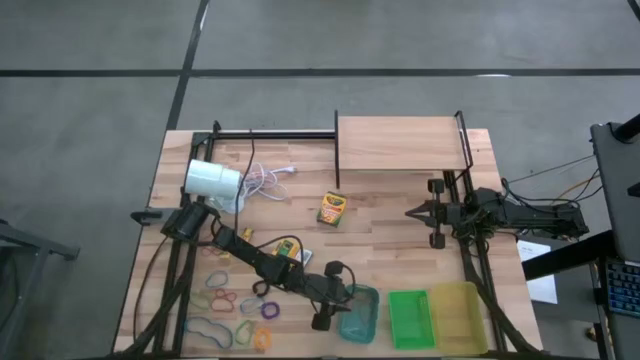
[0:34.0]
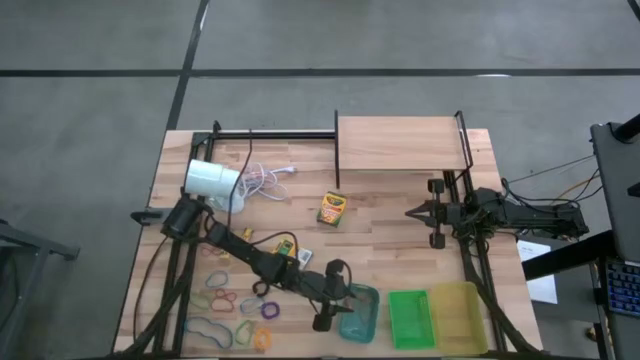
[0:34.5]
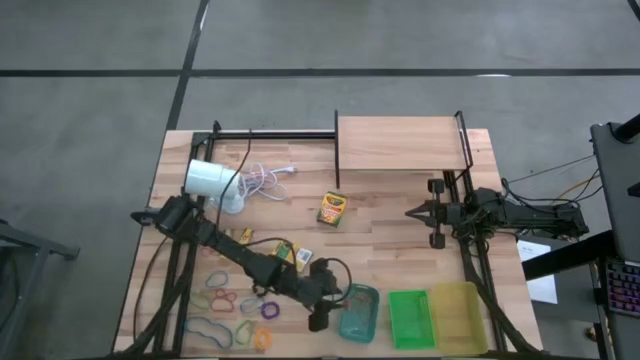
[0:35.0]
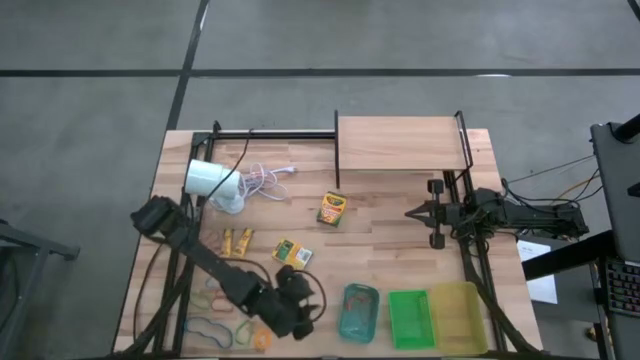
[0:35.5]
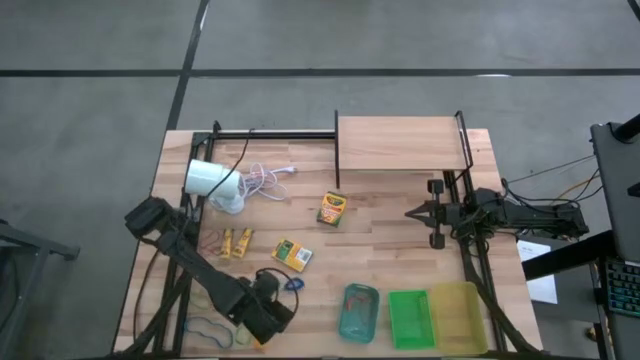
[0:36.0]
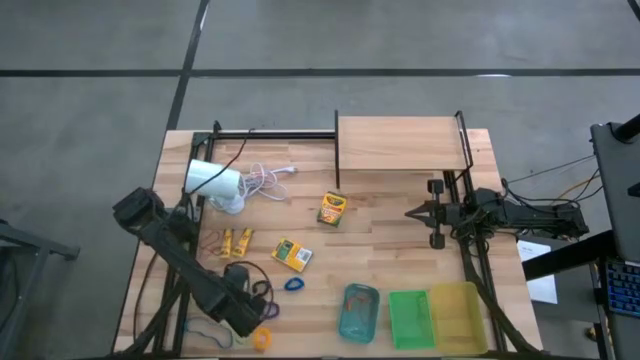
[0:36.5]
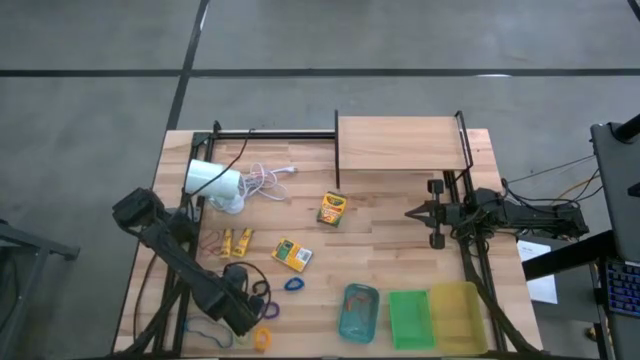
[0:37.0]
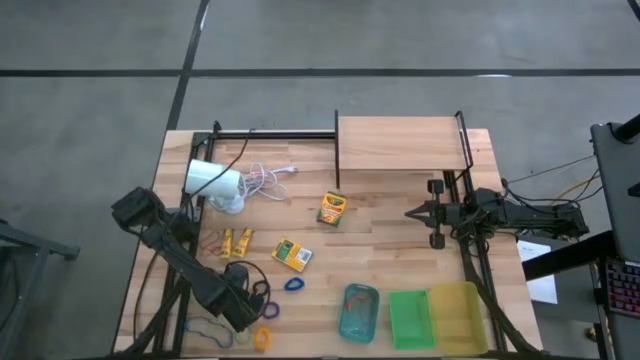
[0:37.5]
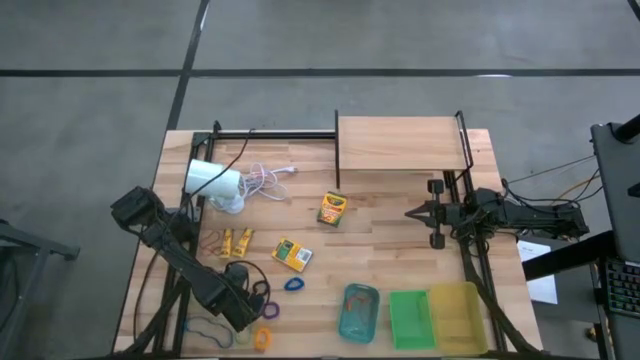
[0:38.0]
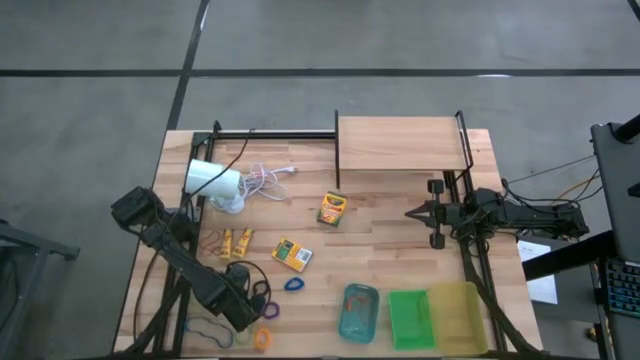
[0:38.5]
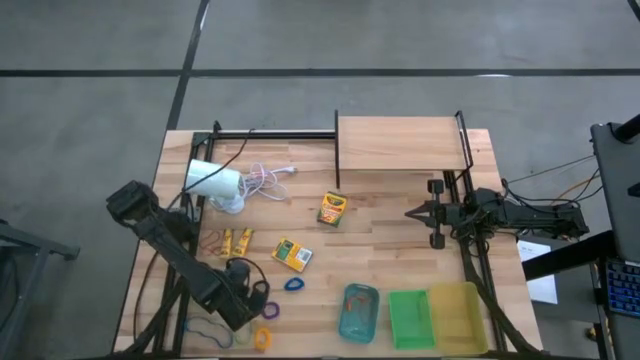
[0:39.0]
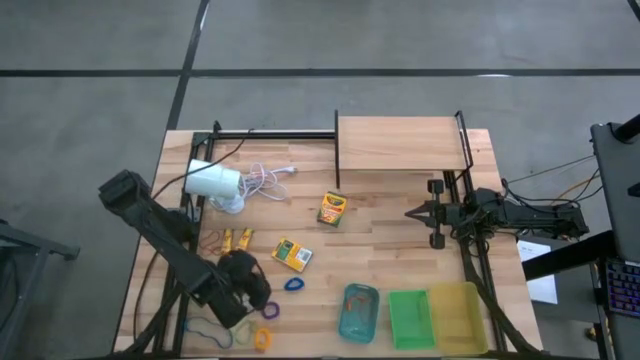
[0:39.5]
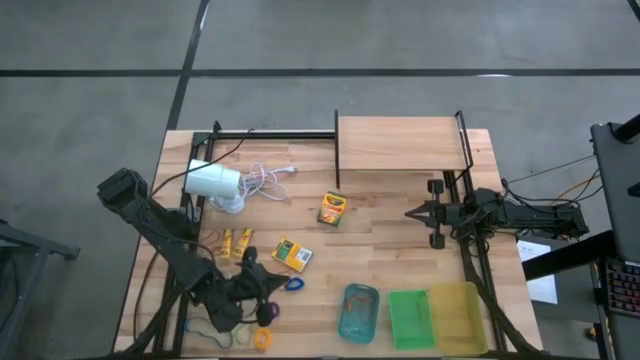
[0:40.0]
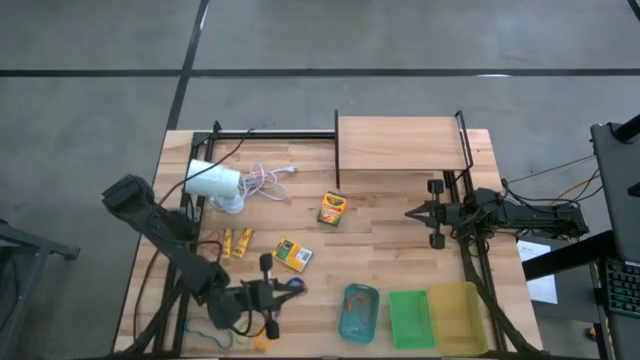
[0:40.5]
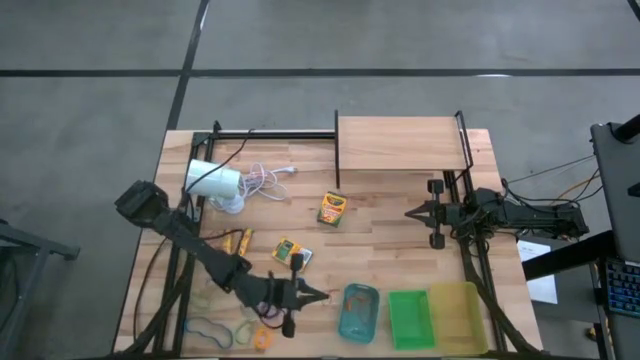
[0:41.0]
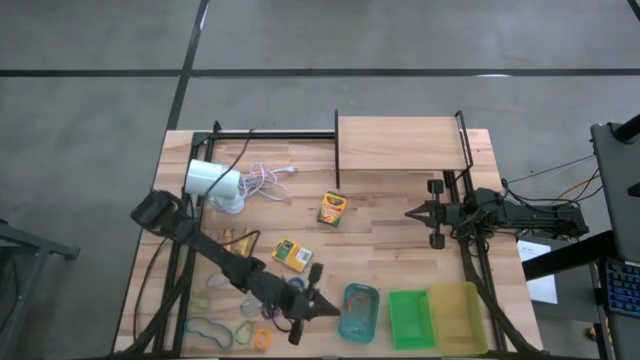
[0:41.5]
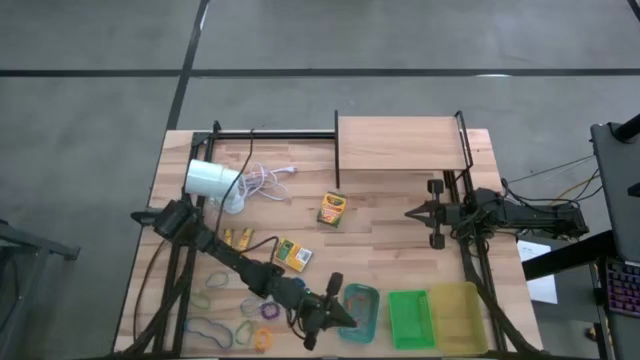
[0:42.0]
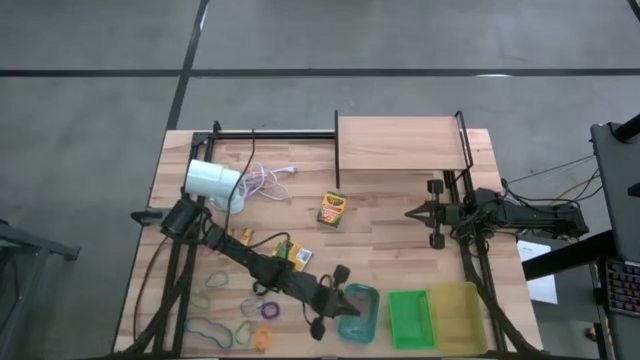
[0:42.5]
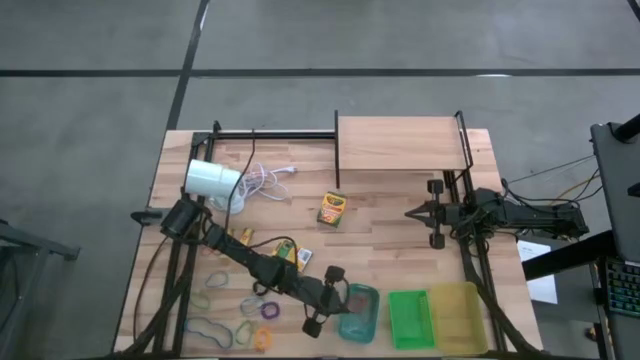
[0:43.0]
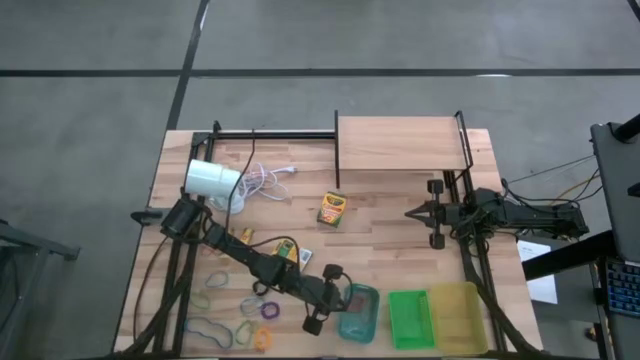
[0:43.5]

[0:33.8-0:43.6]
Task: Pick & Place Office Desk Supplies
Put the red rubber band into the blue bin

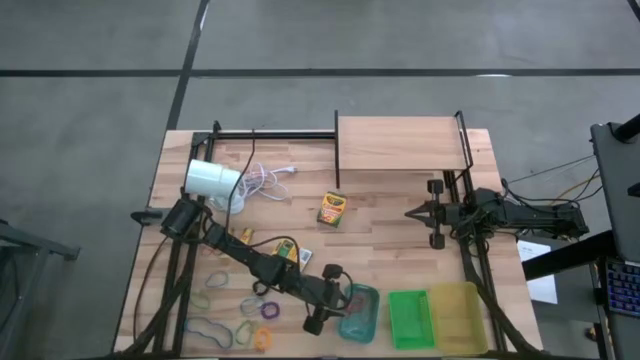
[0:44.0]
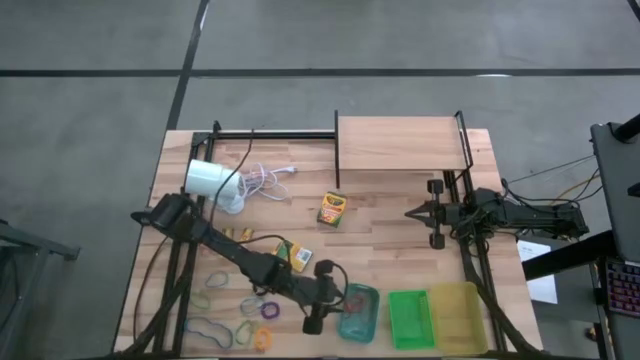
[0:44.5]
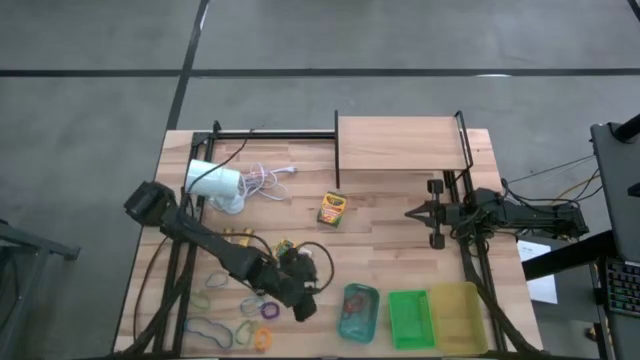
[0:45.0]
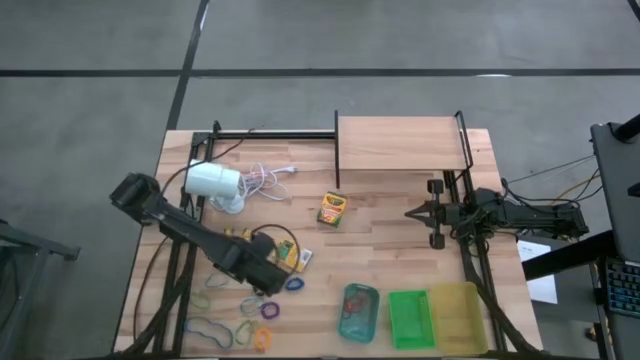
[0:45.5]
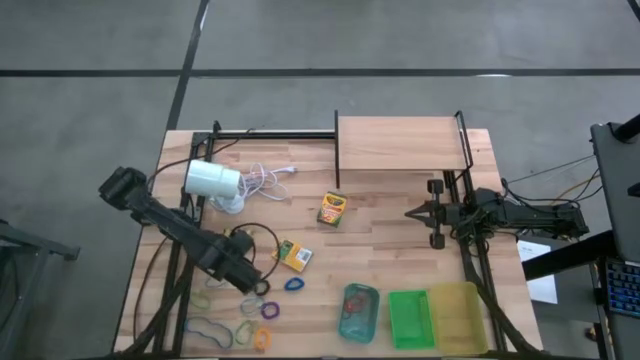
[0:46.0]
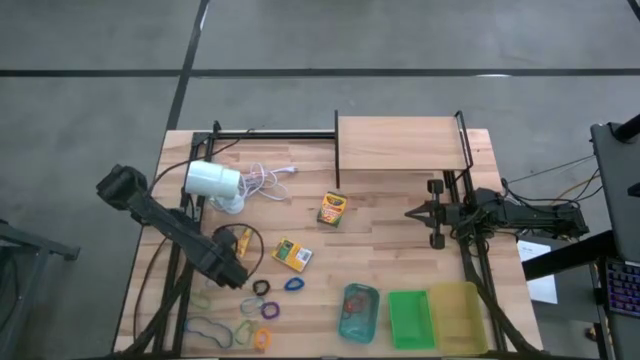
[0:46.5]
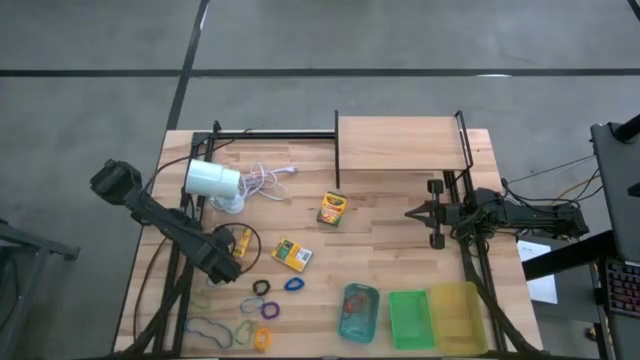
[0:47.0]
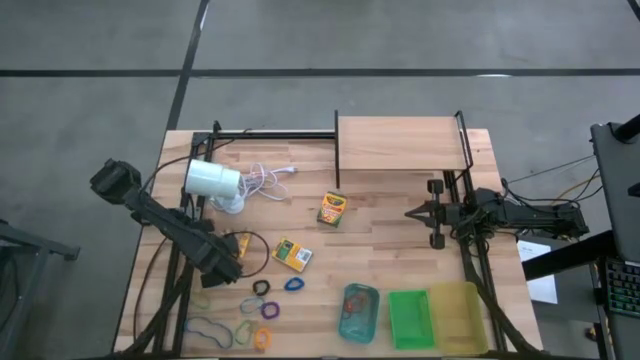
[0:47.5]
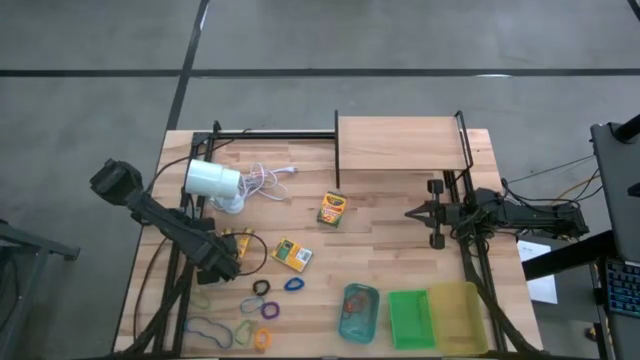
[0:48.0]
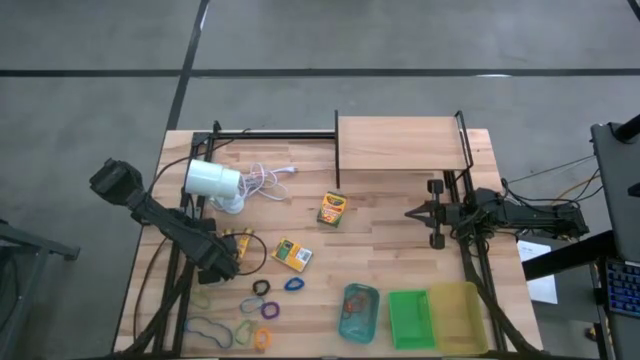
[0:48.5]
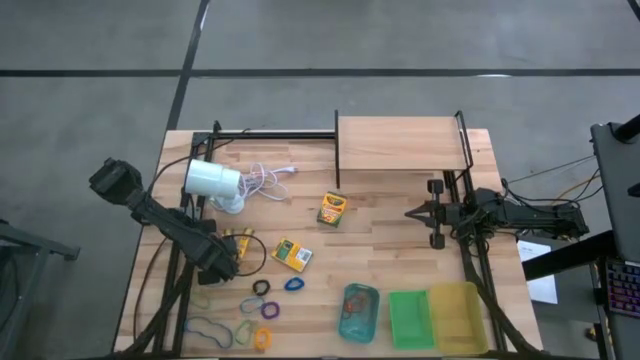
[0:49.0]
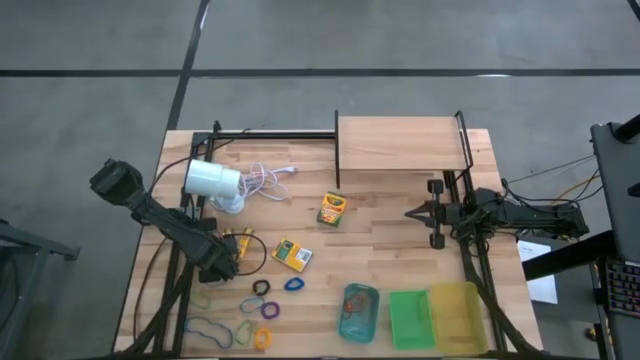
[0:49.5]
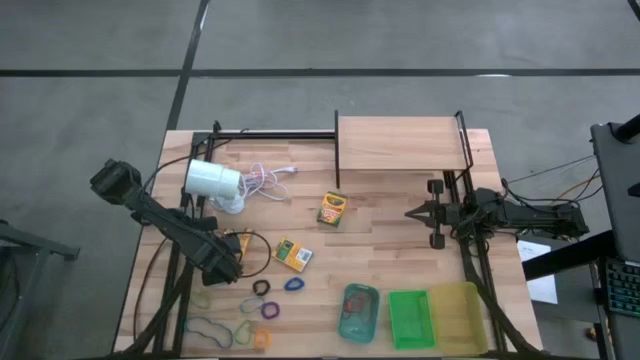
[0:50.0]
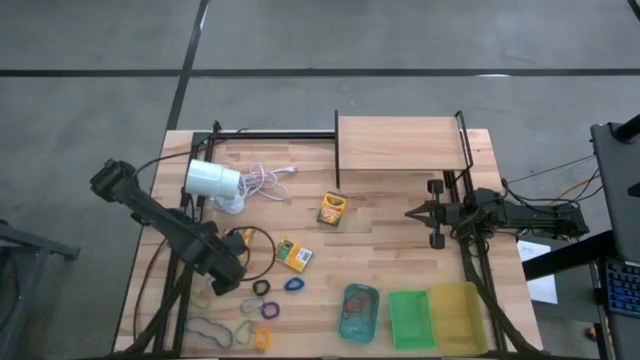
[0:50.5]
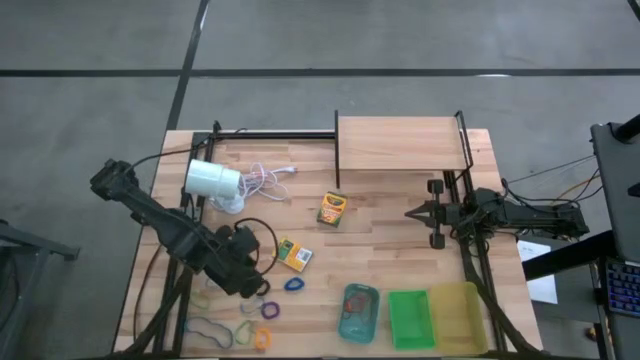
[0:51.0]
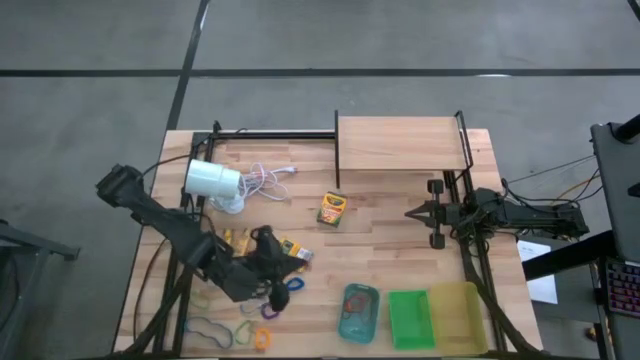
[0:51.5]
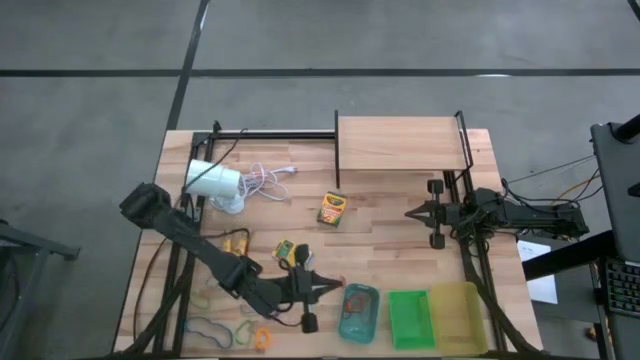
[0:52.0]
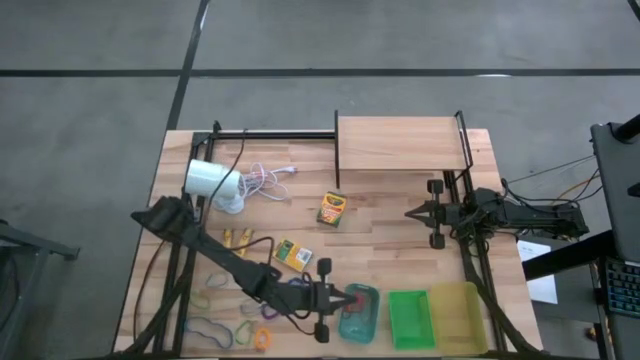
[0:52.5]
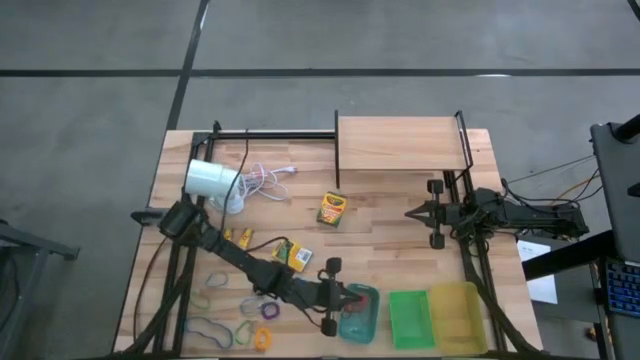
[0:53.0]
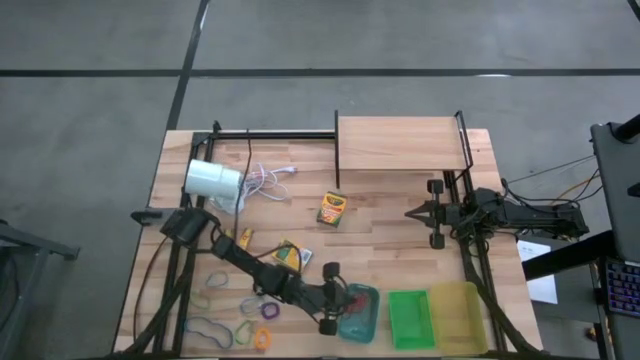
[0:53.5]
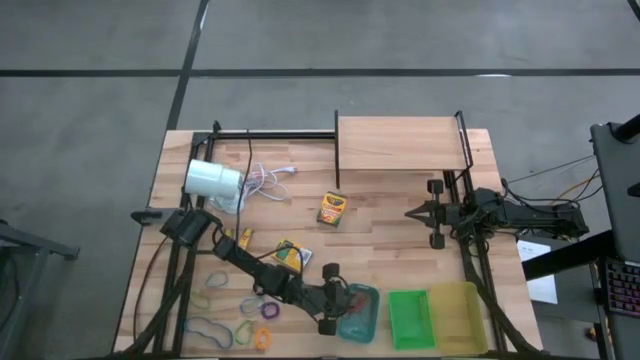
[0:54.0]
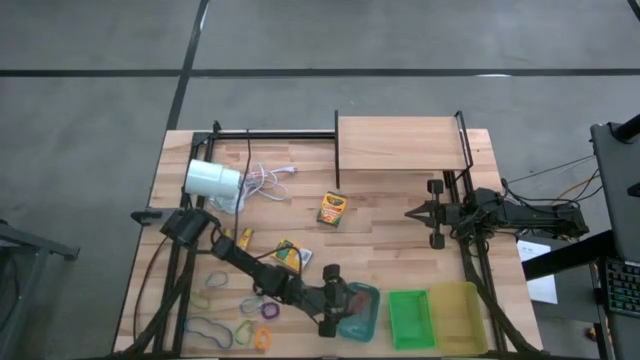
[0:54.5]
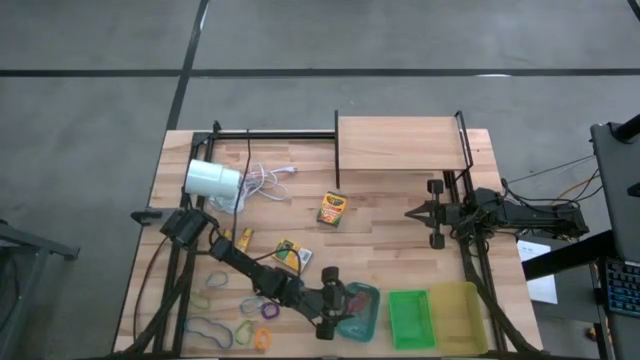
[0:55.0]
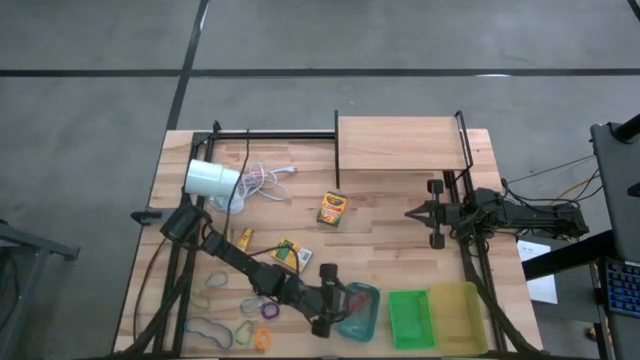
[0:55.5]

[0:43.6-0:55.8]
Put the red rubber band into the blue bin
